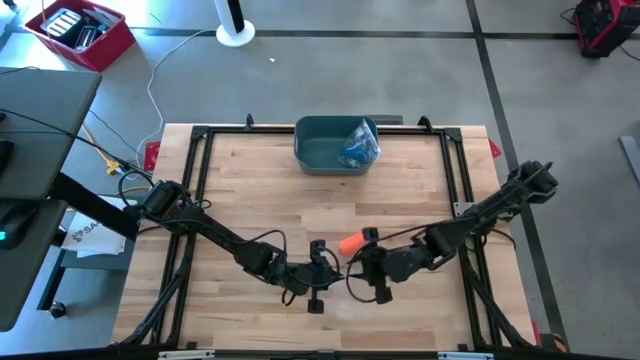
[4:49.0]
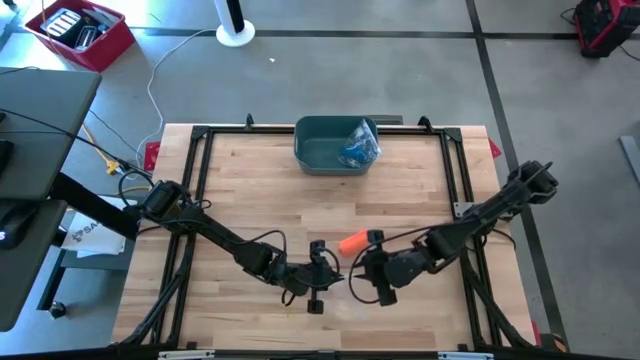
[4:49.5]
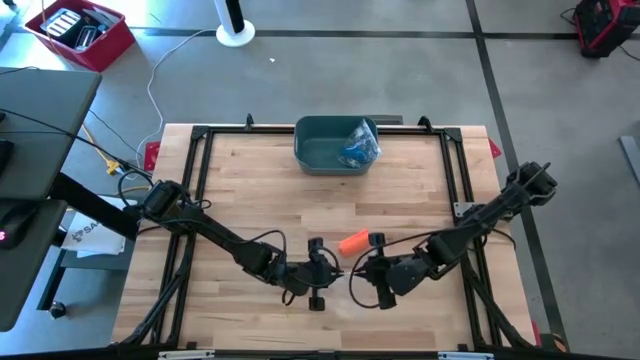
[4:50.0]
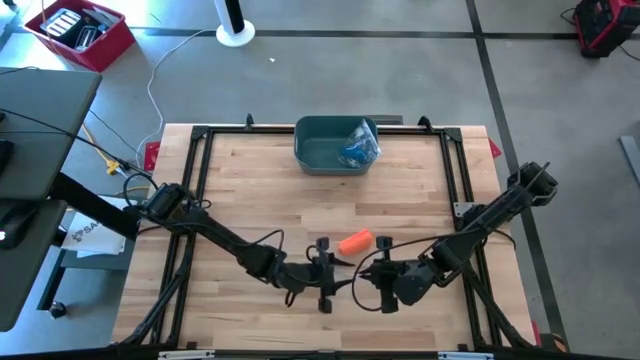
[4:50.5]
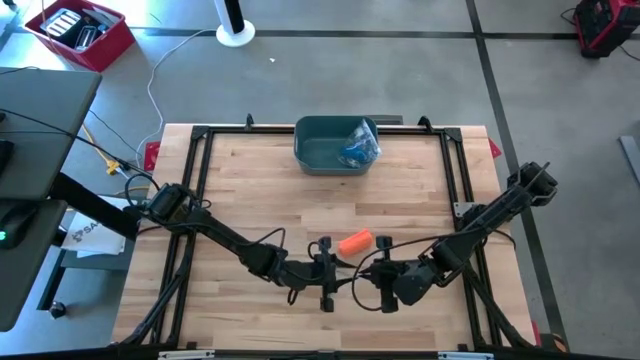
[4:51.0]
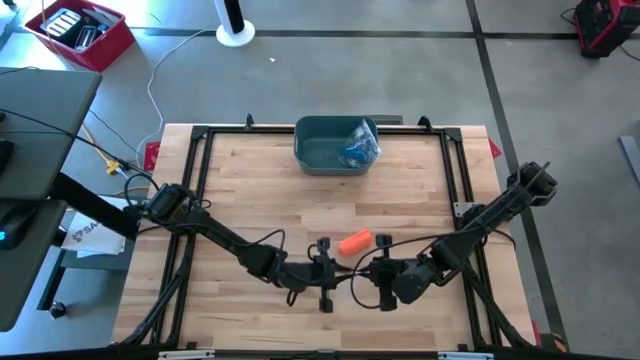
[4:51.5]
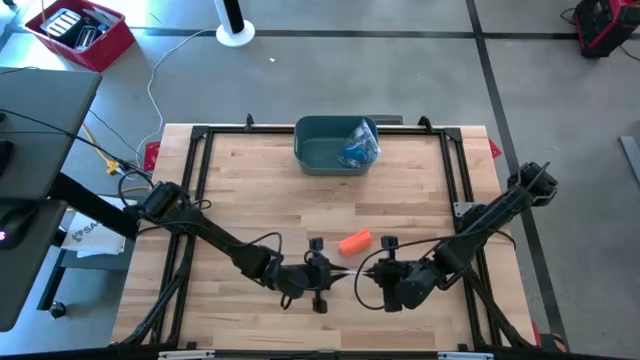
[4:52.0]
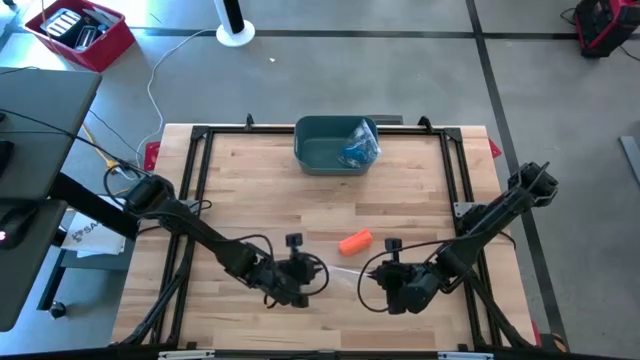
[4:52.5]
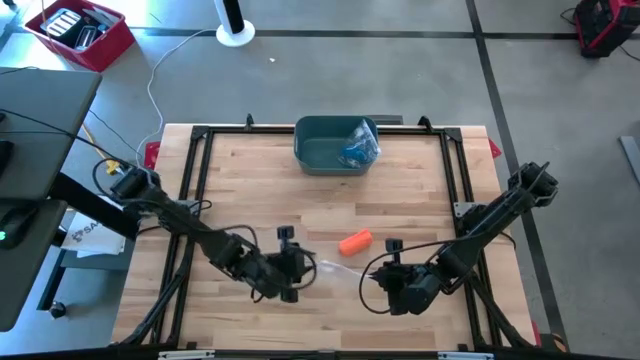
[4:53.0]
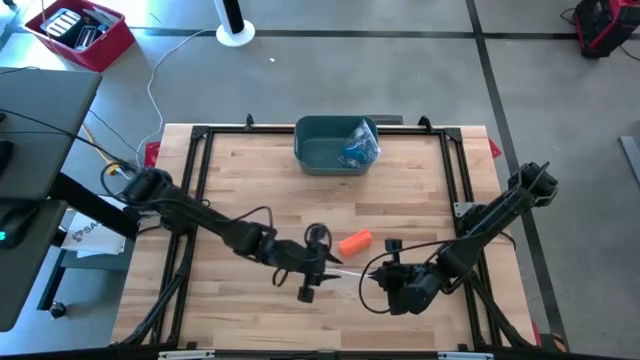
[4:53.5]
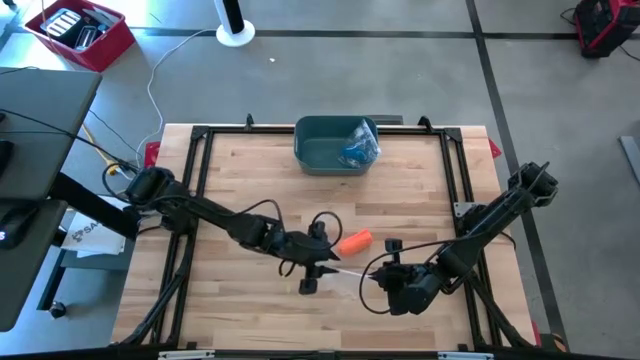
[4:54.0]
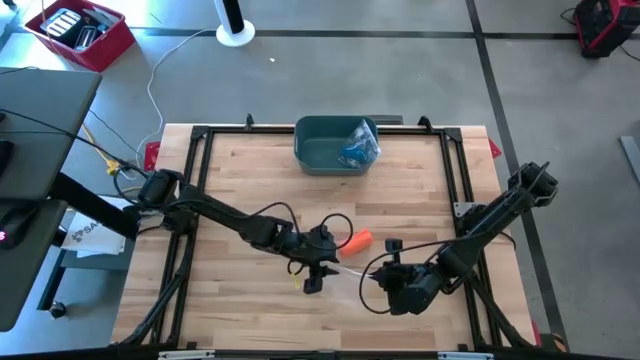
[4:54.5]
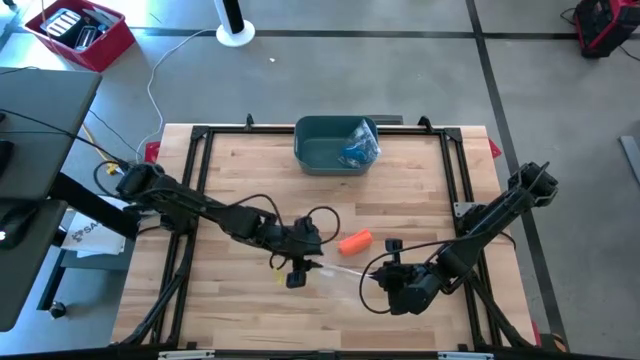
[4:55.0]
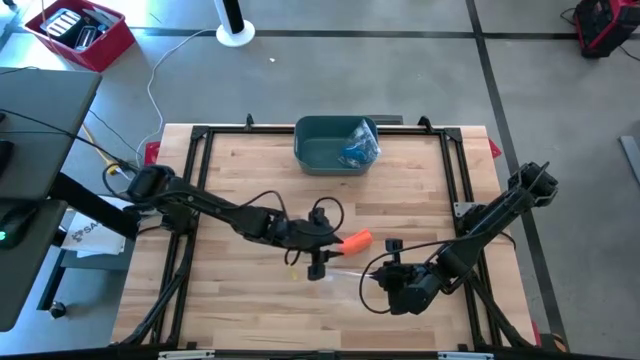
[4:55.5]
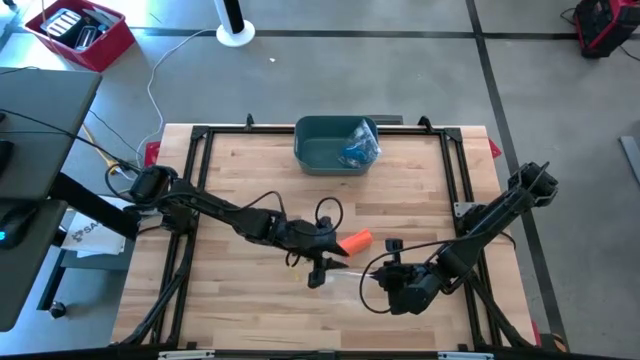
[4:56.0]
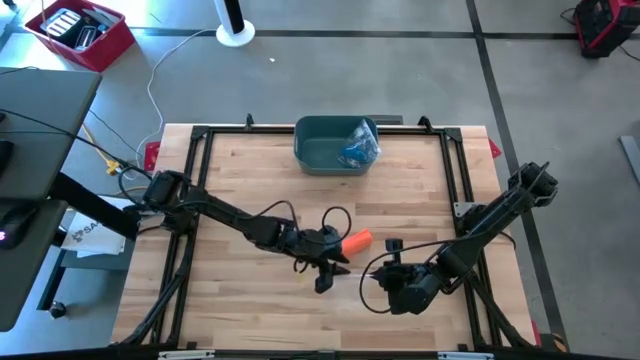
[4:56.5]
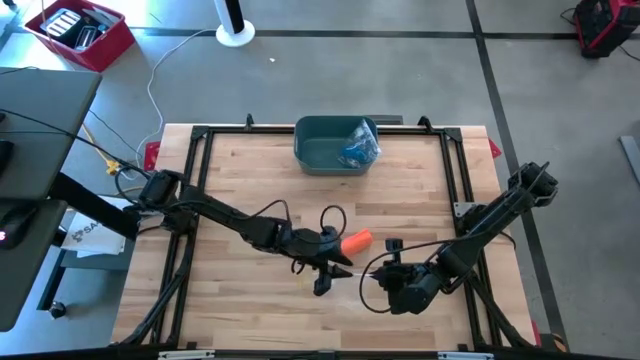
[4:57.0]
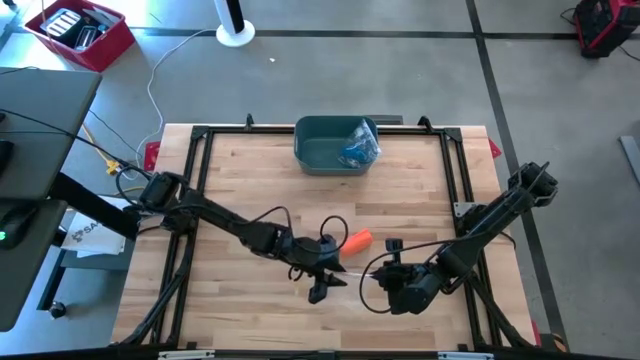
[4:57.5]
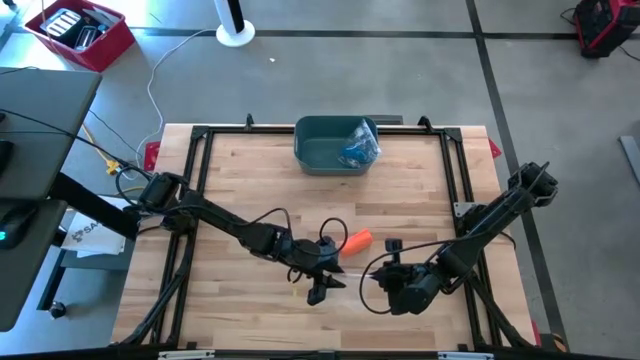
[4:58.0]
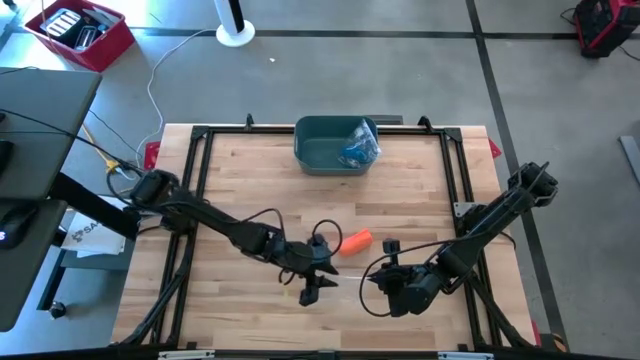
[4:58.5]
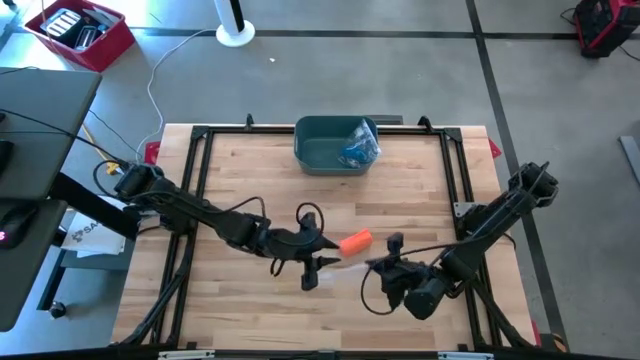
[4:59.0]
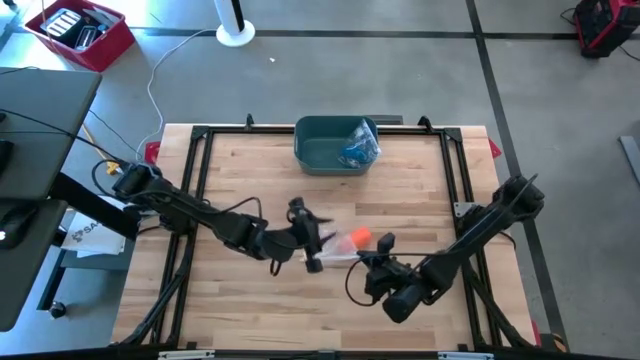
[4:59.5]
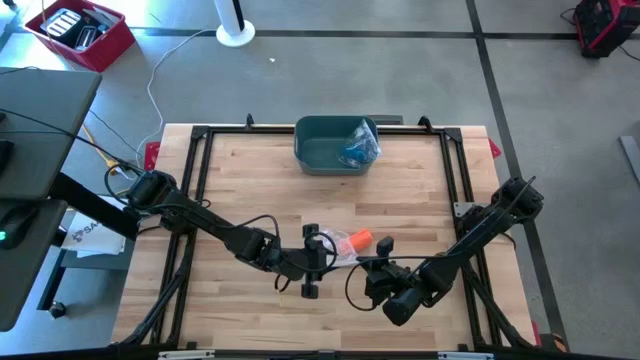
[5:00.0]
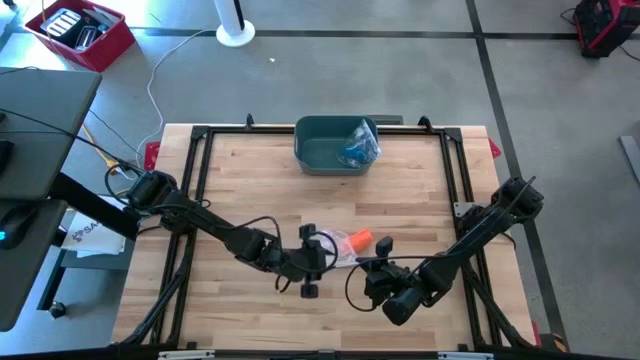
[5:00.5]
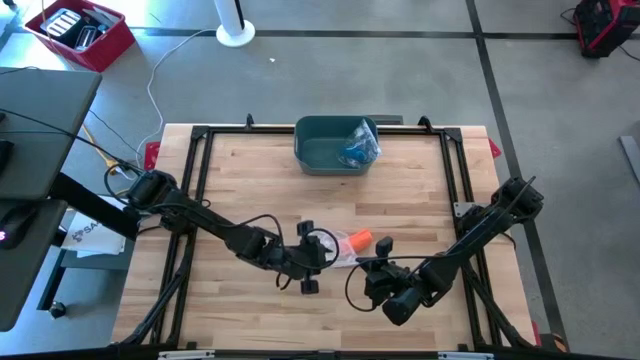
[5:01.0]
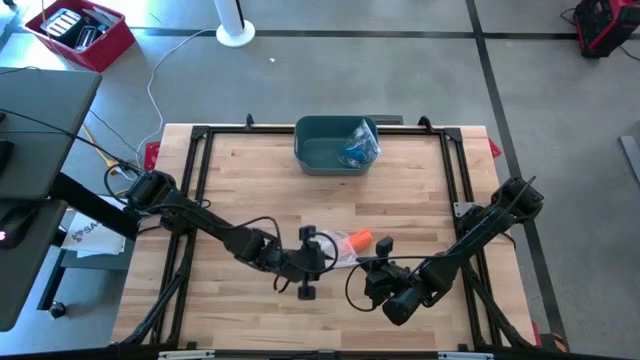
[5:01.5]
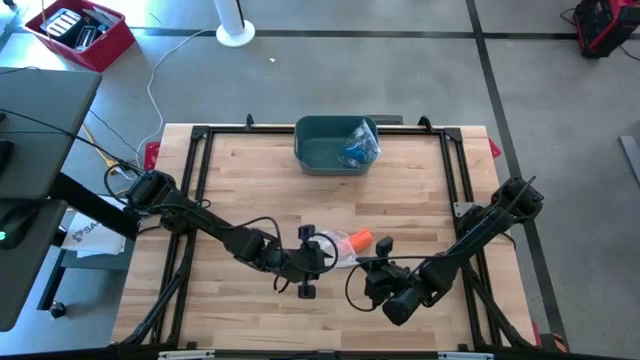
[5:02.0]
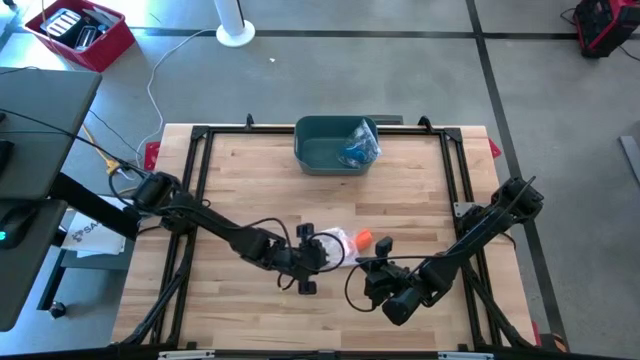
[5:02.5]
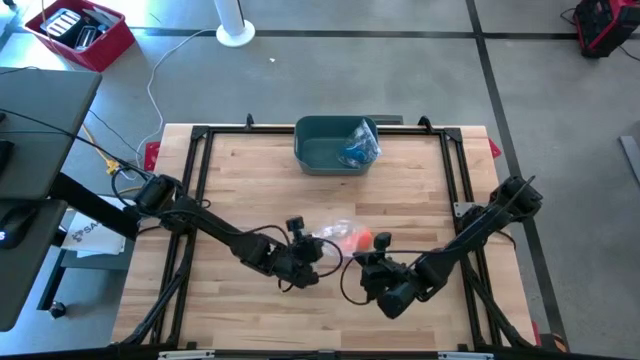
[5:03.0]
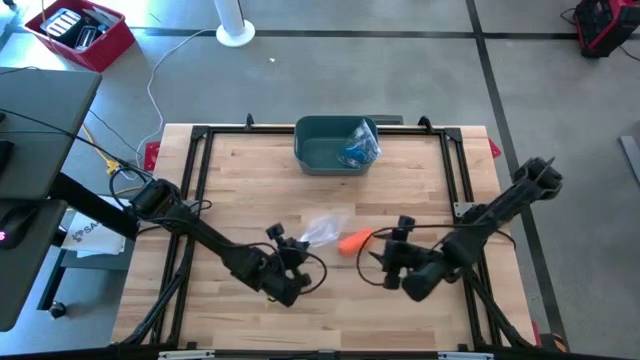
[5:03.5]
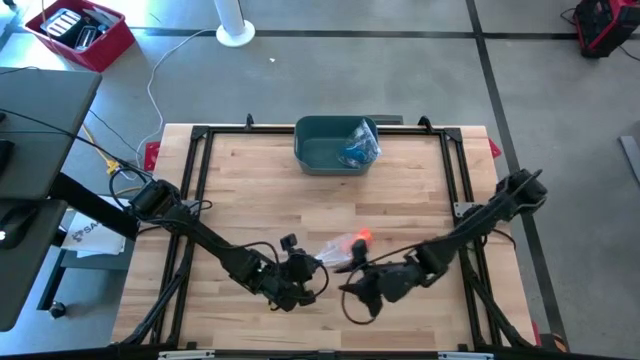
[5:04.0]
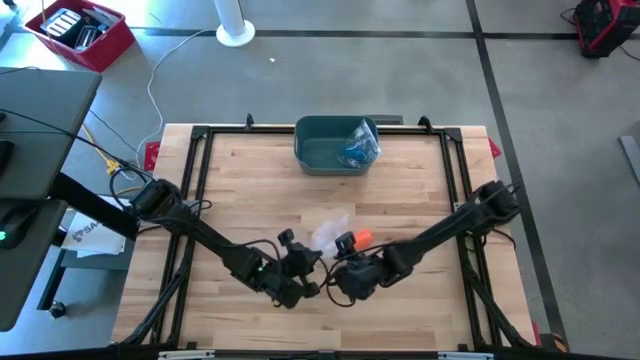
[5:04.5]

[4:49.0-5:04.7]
Task: Roll bandage
Put the rolled orange bandage into the transparent zip bag
